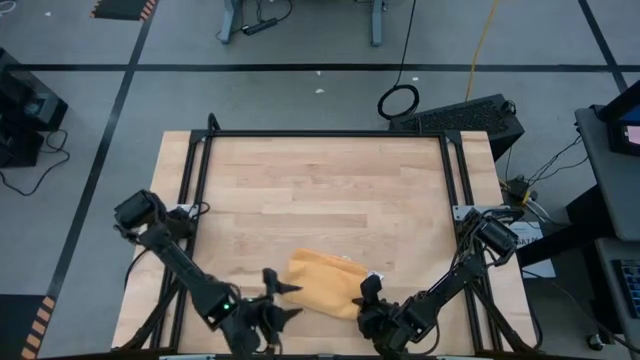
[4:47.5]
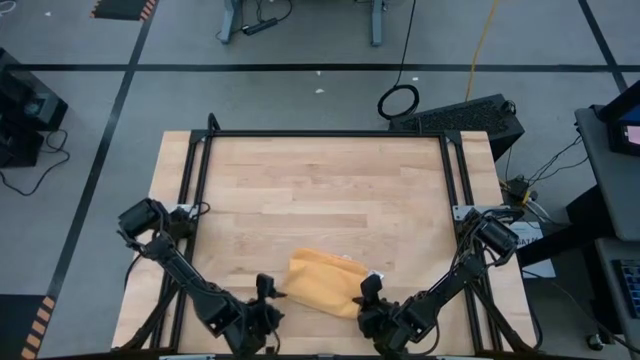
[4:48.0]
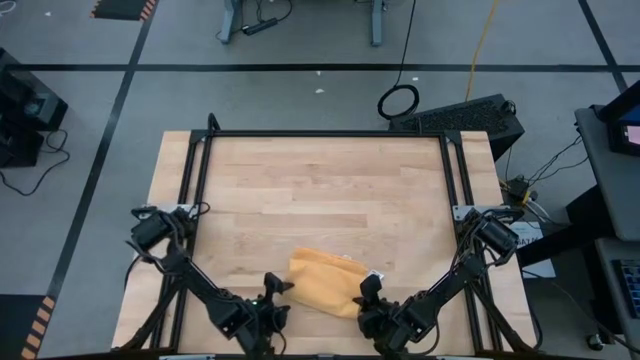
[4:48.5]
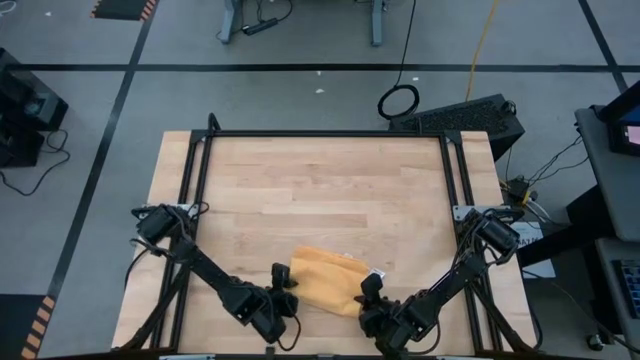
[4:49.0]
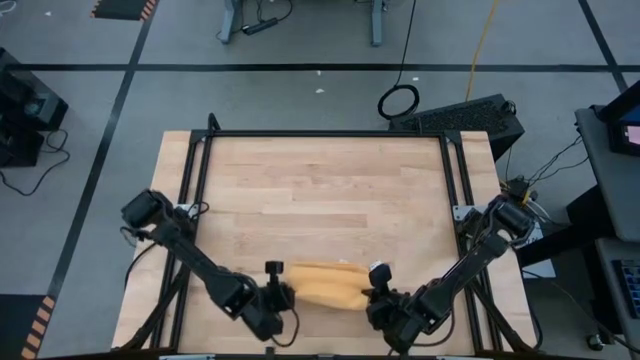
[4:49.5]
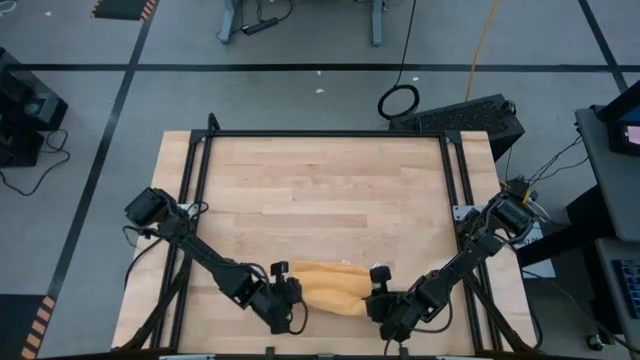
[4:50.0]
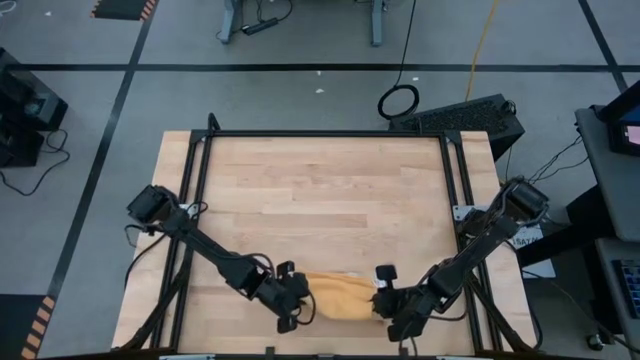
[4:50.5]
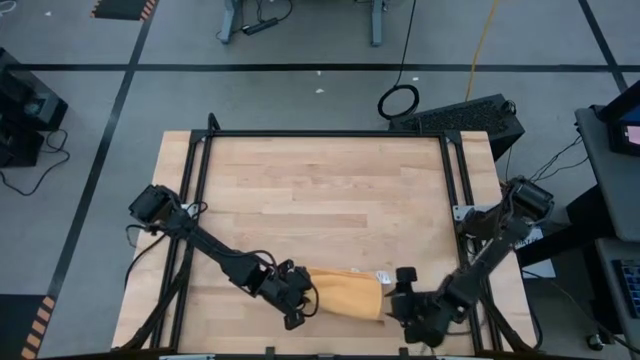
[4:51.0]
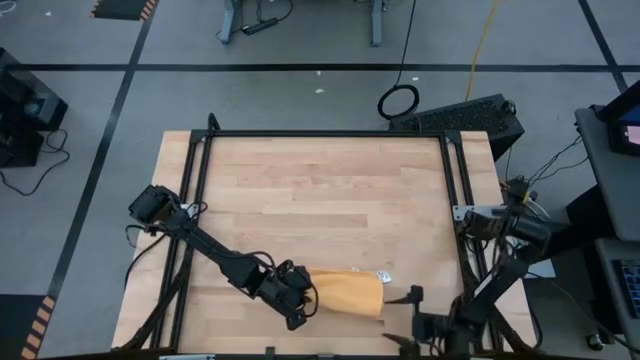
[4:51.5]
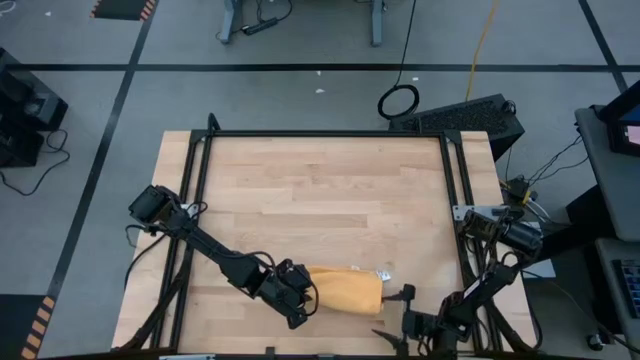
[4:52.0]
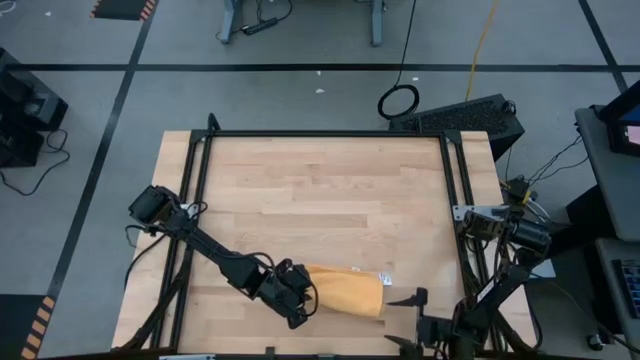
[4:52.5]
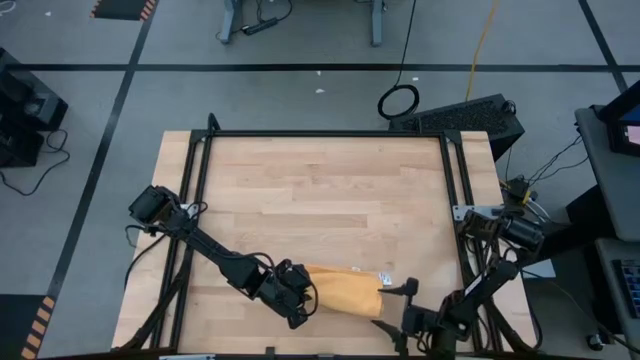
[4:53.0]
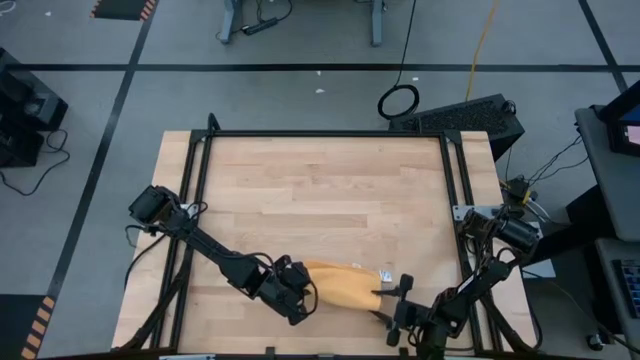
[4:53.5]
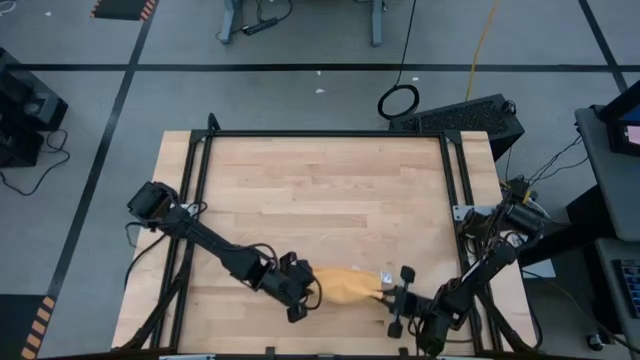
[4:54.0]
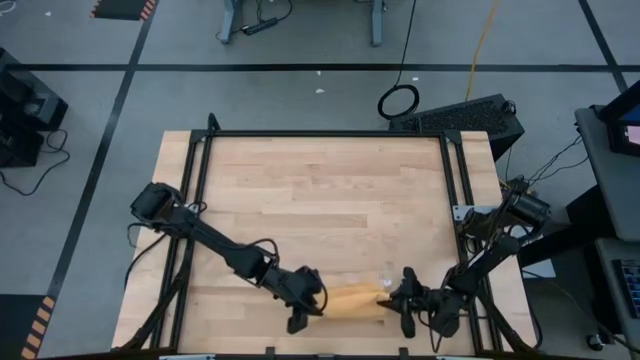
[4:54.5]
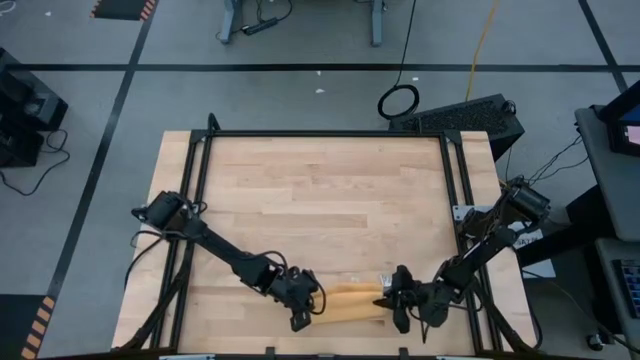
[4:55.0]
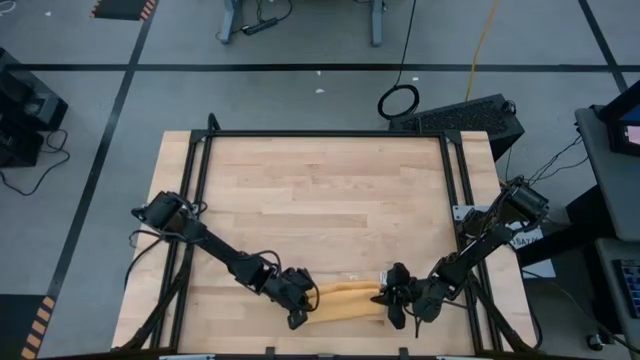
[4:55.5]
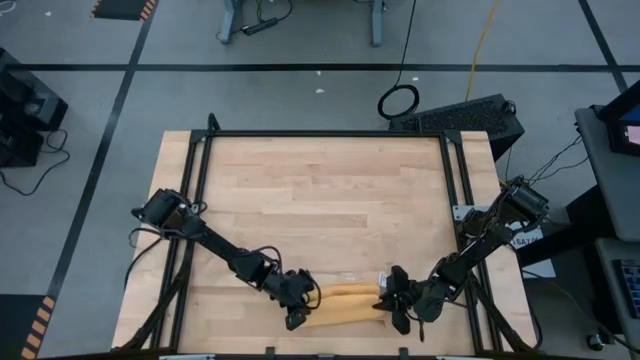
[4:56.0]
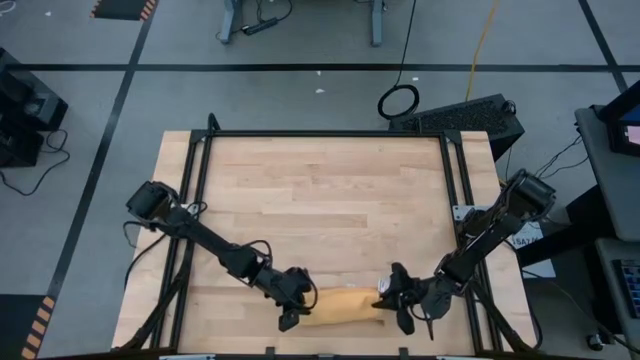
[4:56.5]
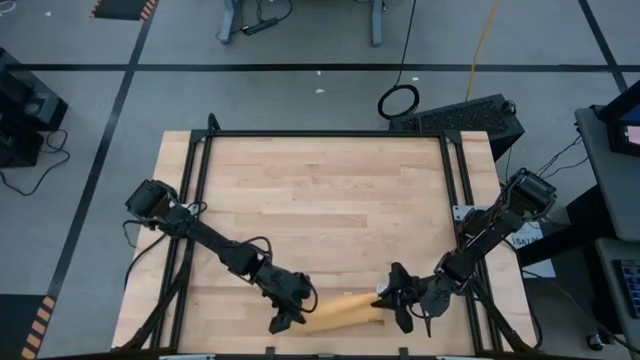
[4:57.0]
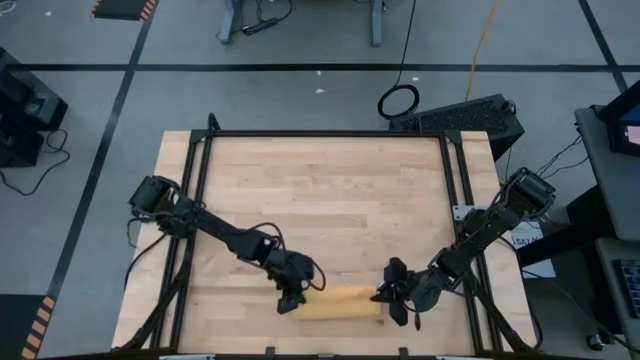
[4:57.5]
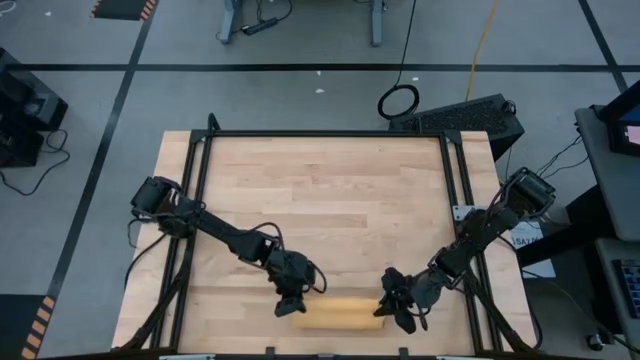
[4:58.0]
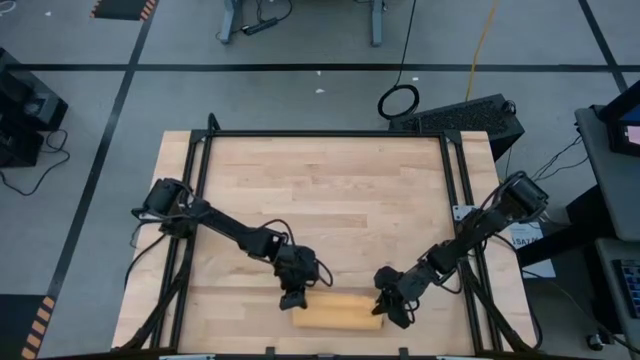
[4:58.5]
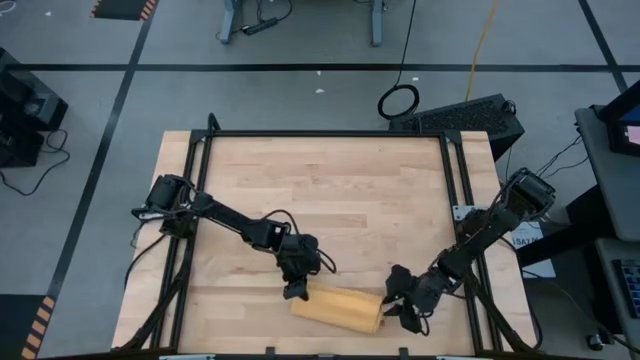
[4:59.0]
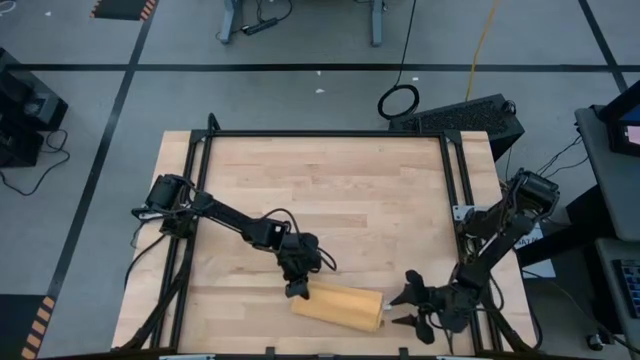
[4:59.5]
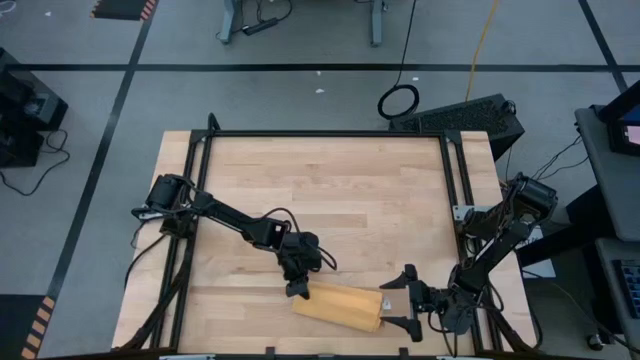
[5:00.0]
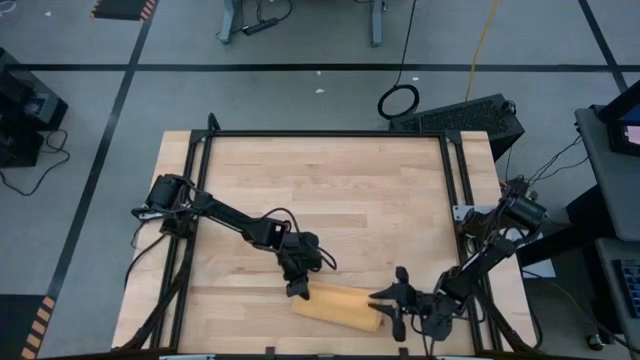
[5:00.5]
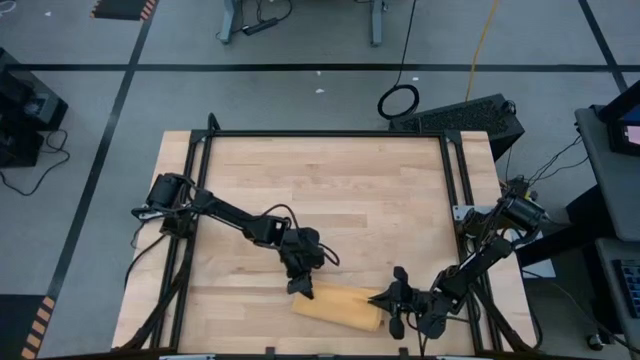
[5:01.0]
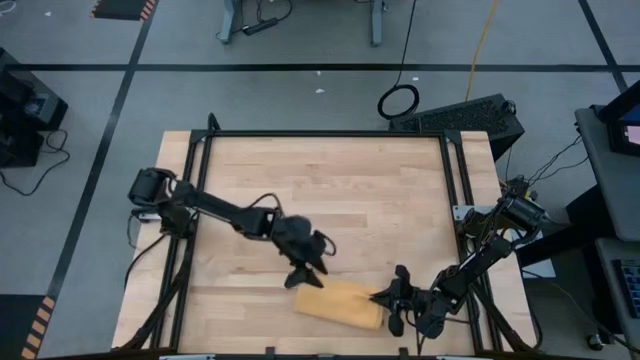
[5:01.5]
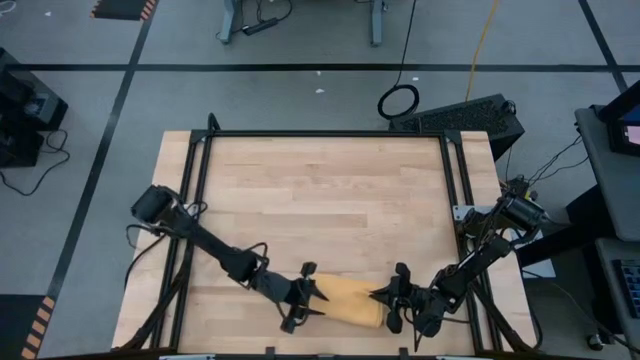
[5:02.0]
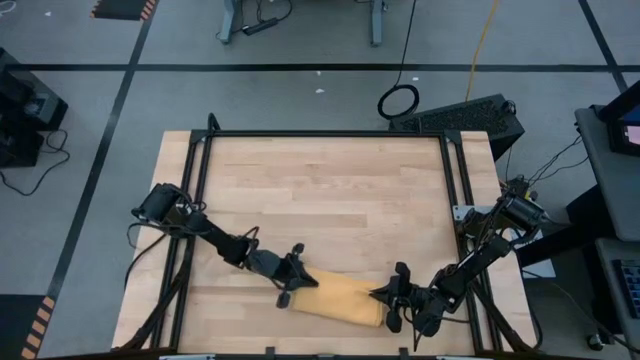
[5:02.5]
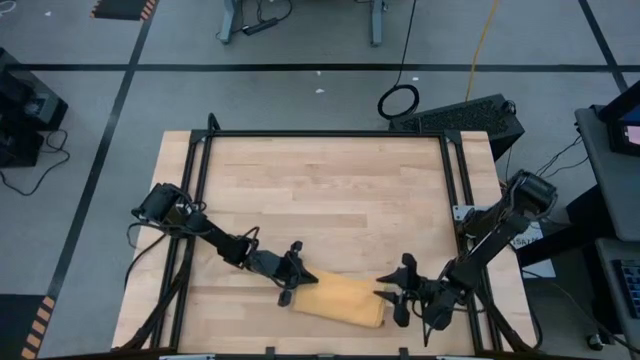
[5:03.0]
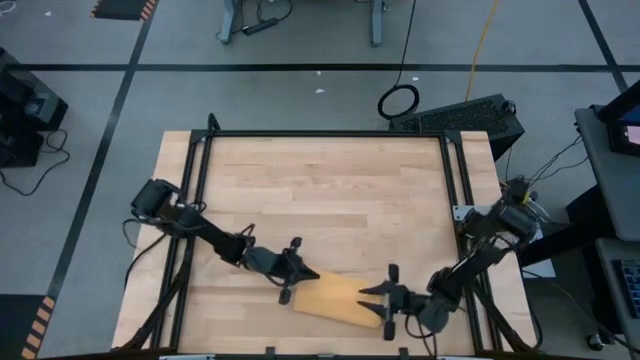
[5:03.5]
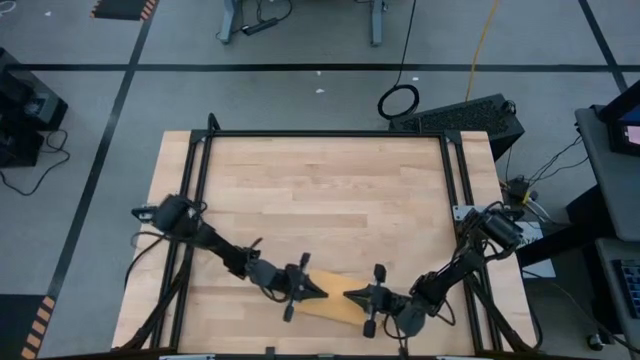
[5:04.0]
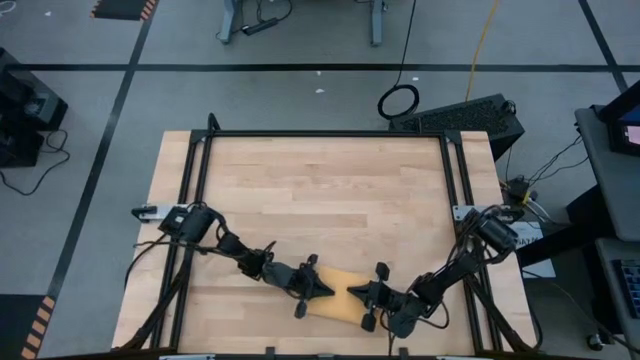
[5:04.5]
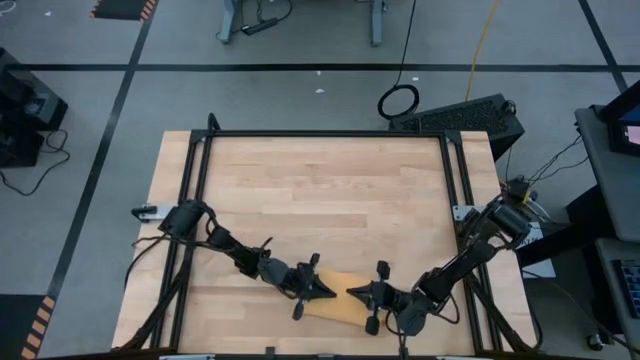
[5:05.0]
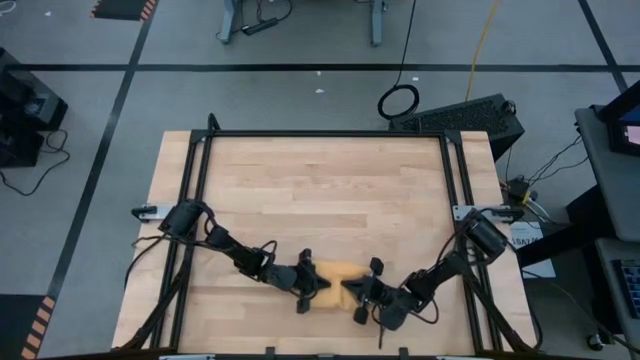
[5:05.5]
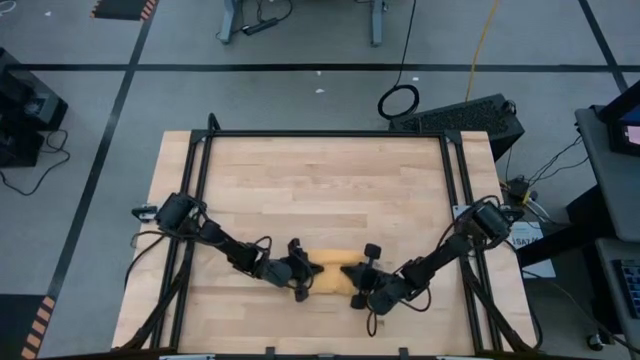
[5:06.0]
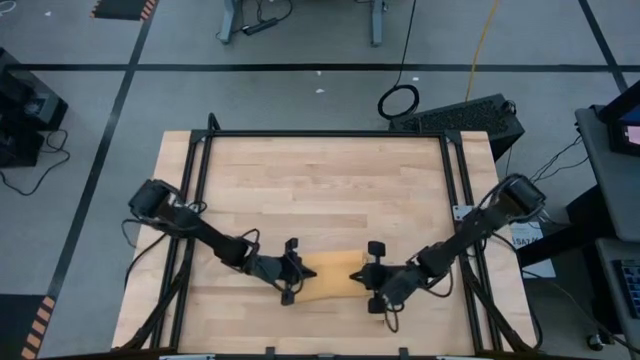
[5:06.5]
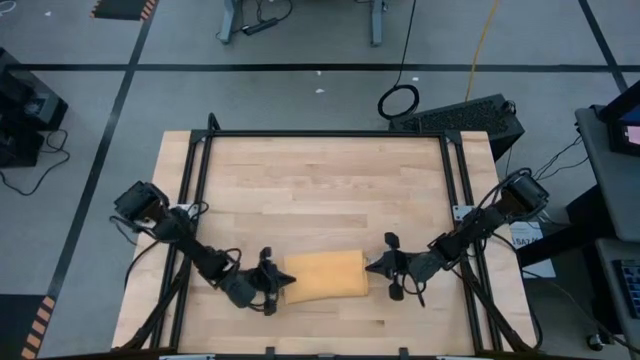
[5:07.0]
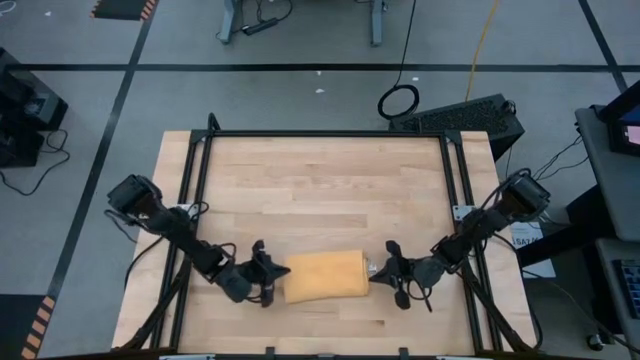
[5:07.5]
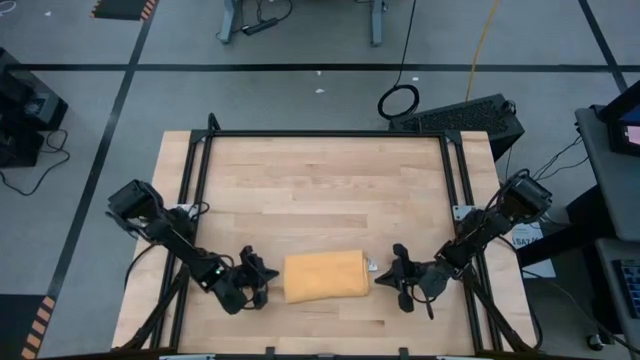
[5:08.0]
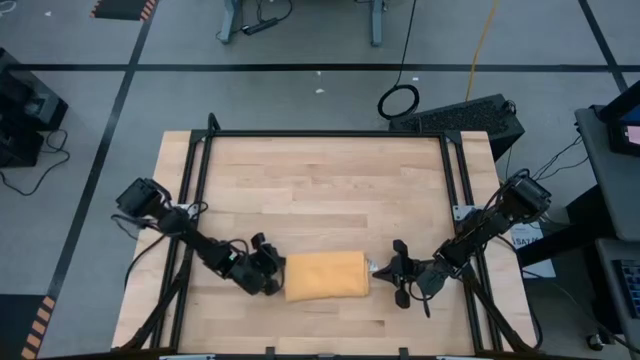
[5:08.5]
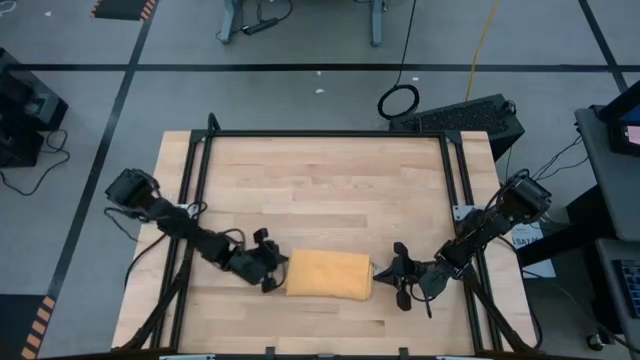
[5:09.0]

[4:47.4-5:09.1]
Task: Roll towel
Roll the yellow towel
